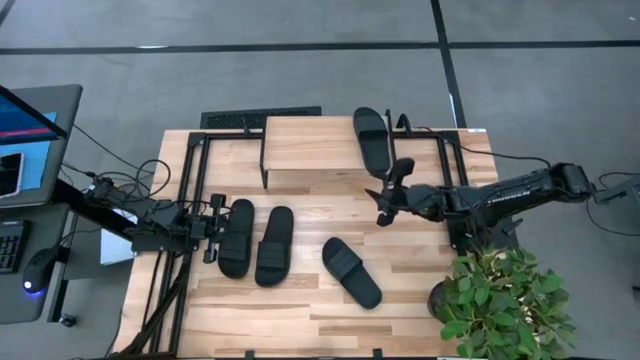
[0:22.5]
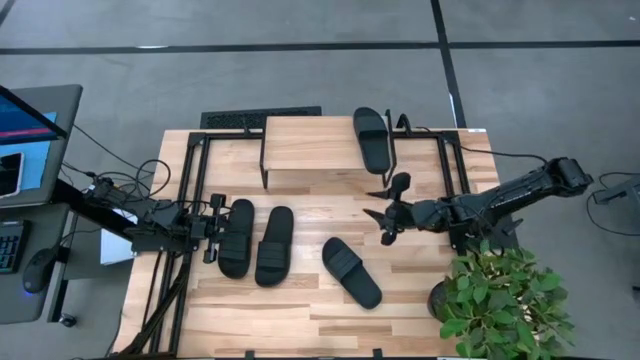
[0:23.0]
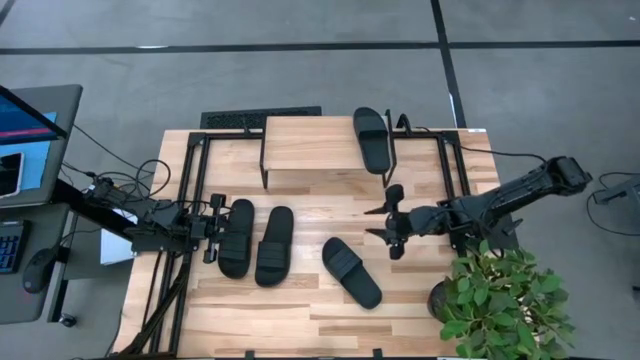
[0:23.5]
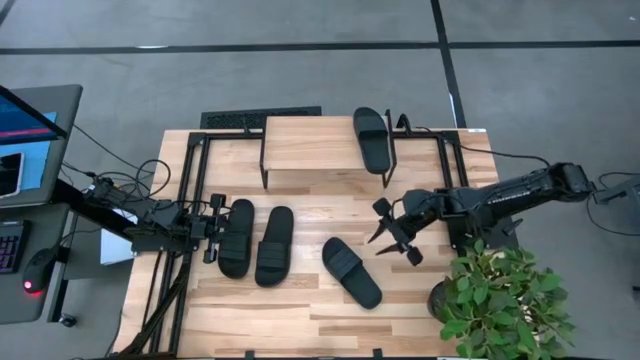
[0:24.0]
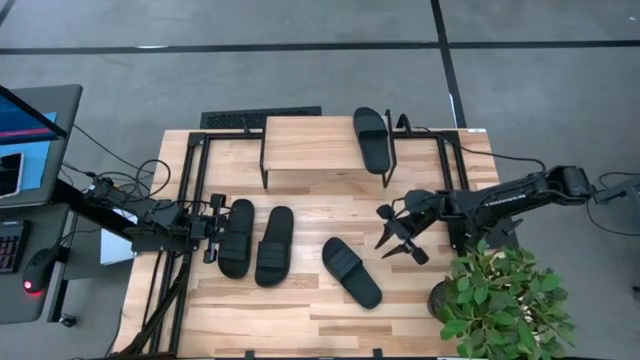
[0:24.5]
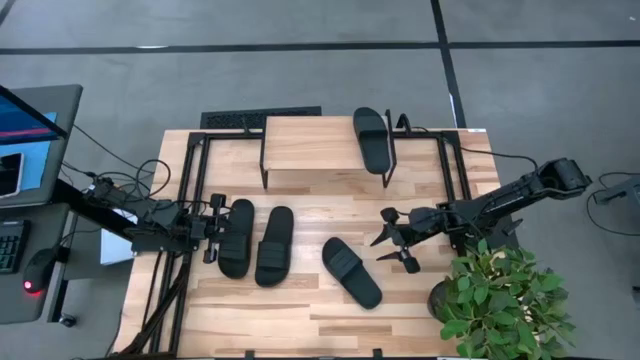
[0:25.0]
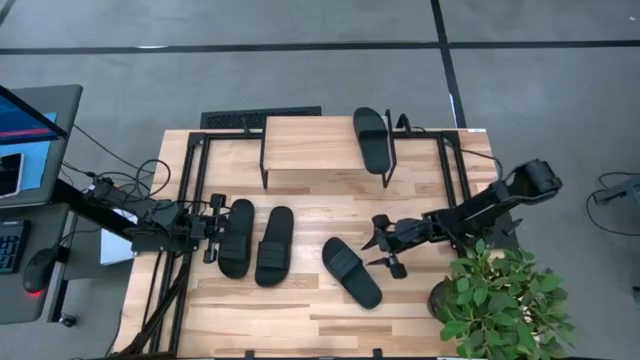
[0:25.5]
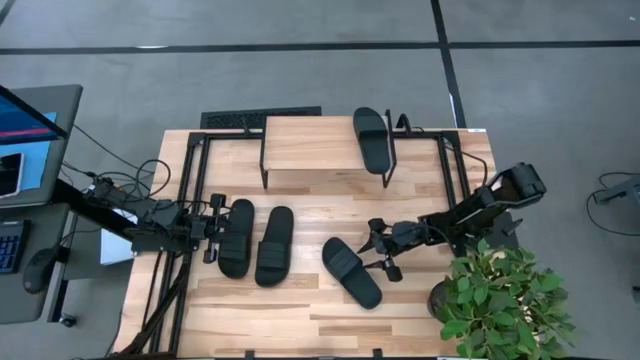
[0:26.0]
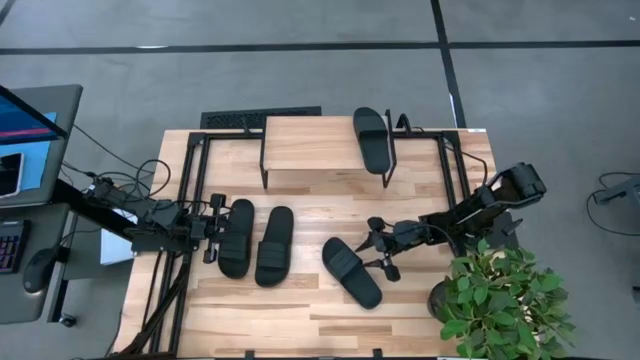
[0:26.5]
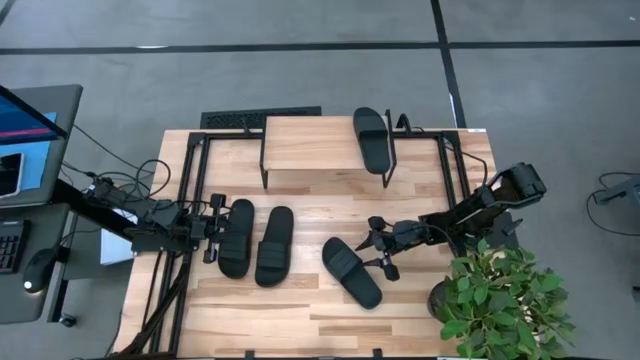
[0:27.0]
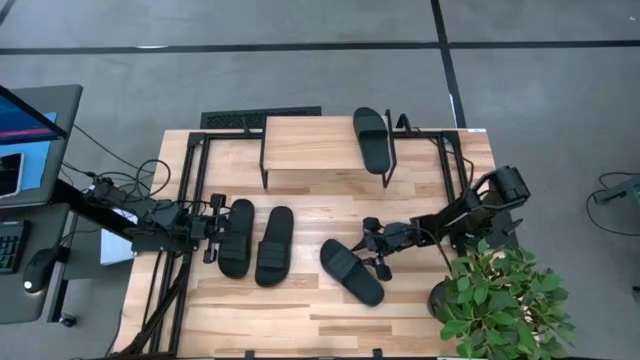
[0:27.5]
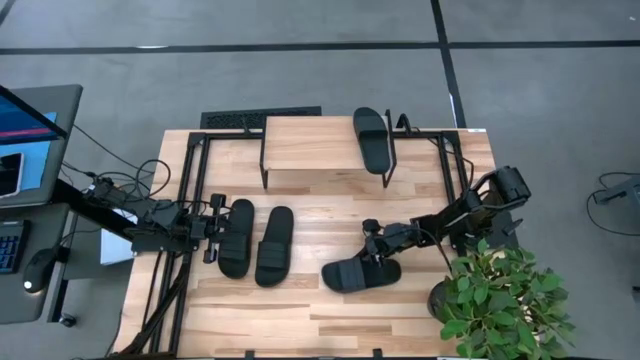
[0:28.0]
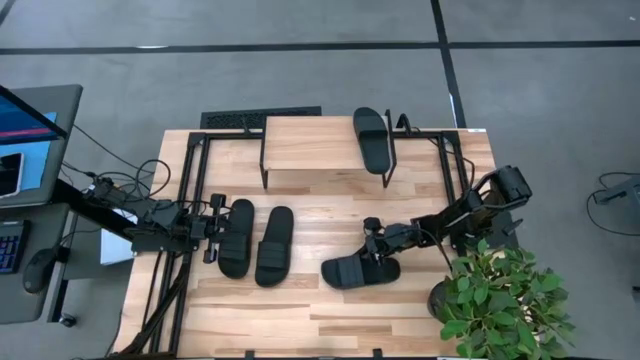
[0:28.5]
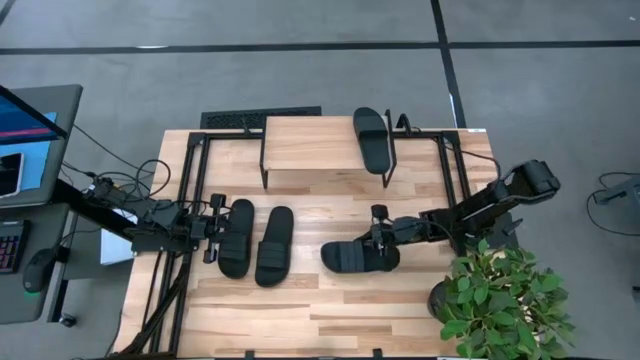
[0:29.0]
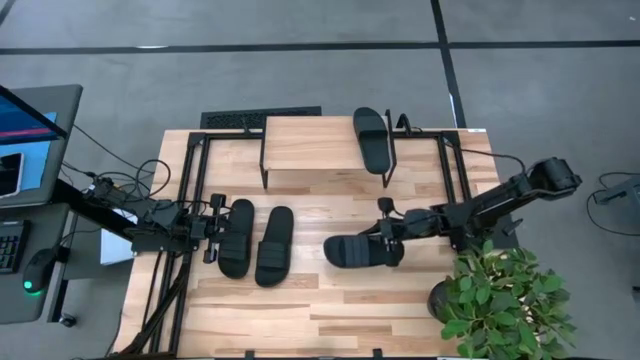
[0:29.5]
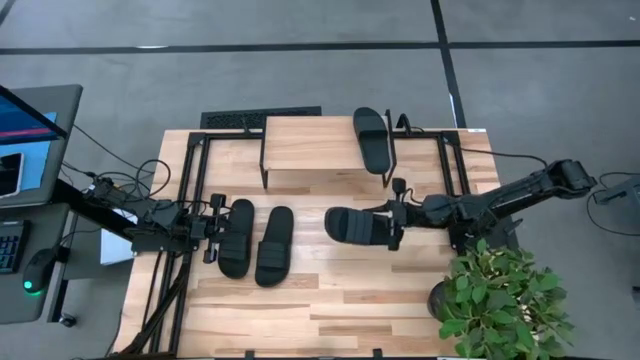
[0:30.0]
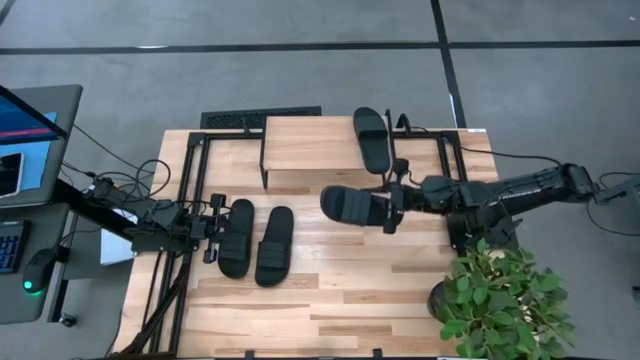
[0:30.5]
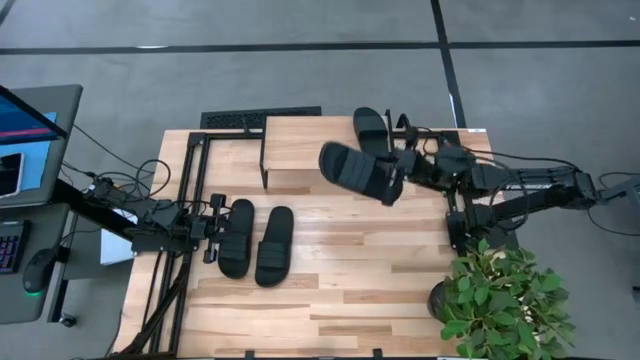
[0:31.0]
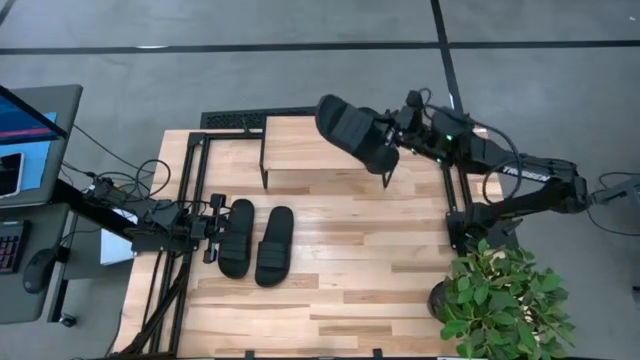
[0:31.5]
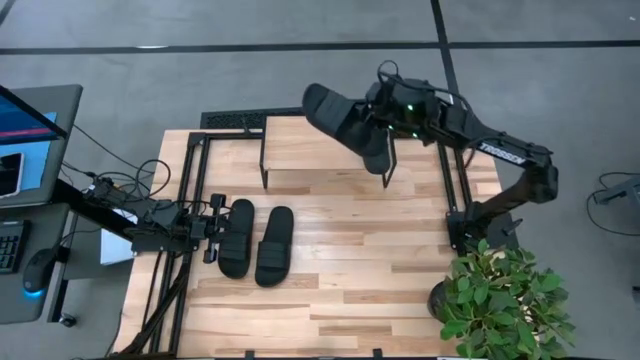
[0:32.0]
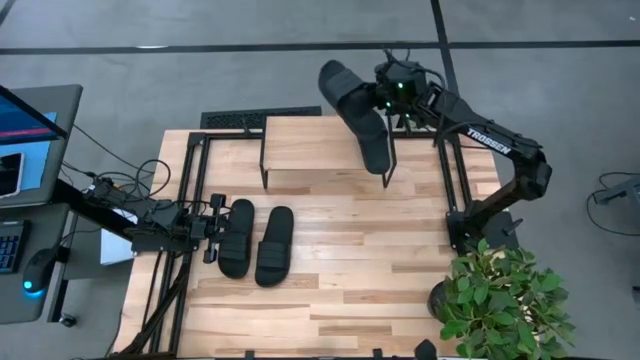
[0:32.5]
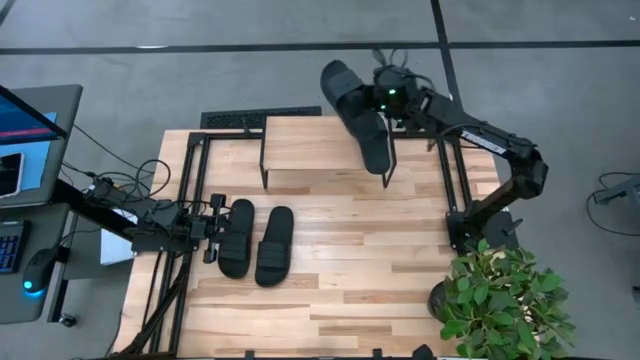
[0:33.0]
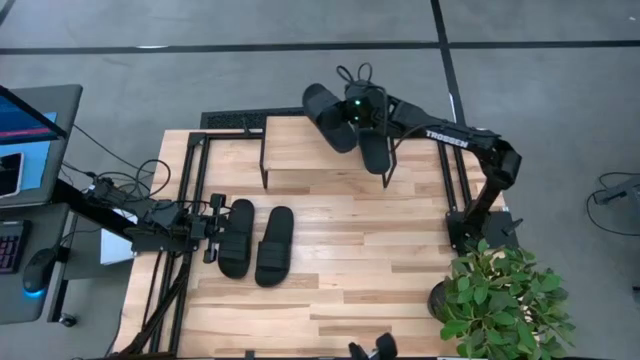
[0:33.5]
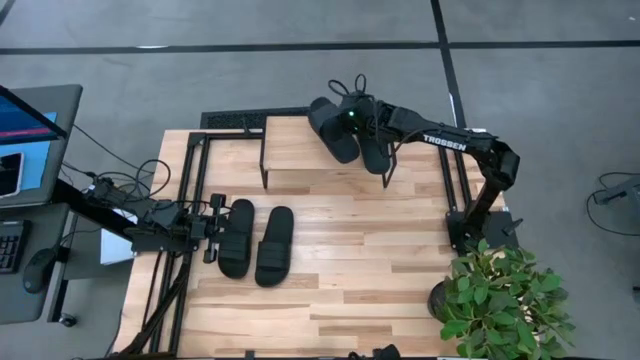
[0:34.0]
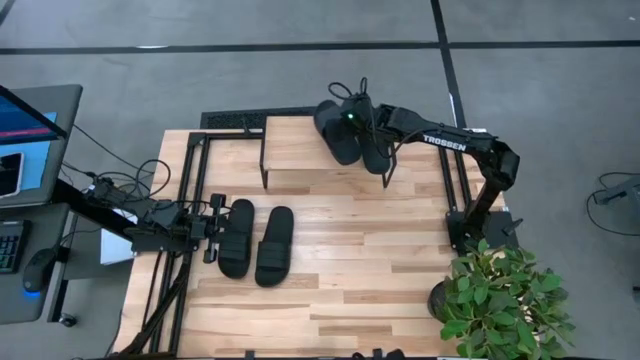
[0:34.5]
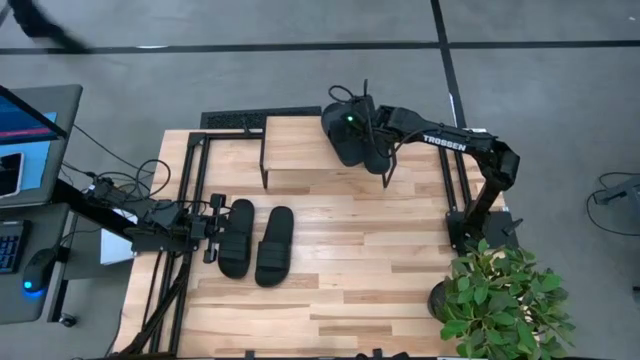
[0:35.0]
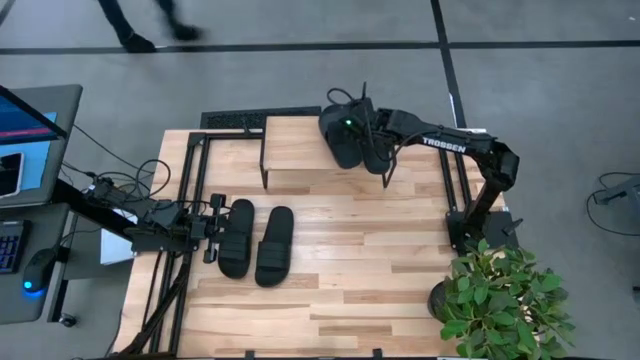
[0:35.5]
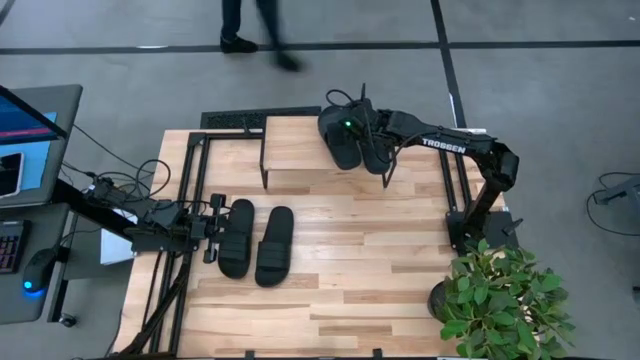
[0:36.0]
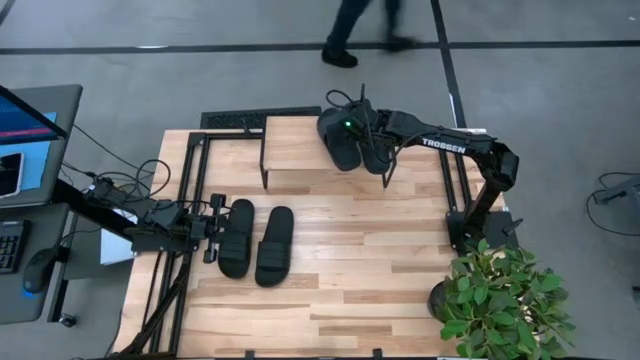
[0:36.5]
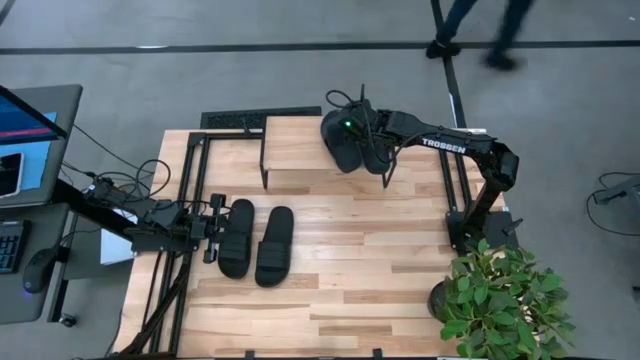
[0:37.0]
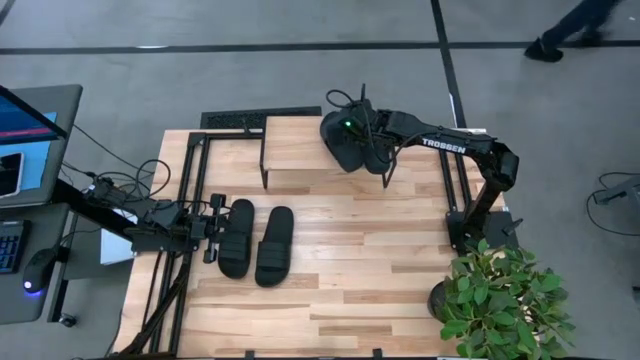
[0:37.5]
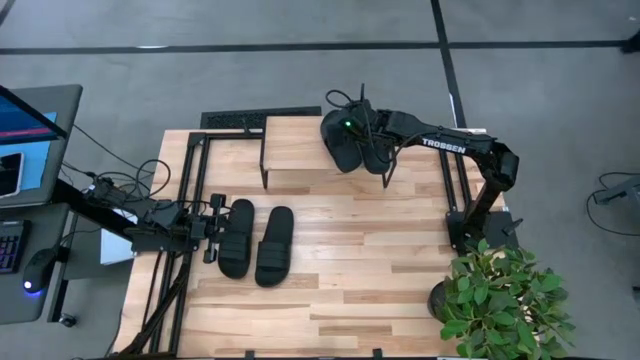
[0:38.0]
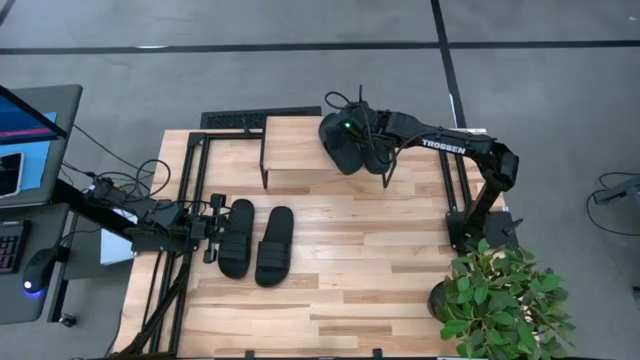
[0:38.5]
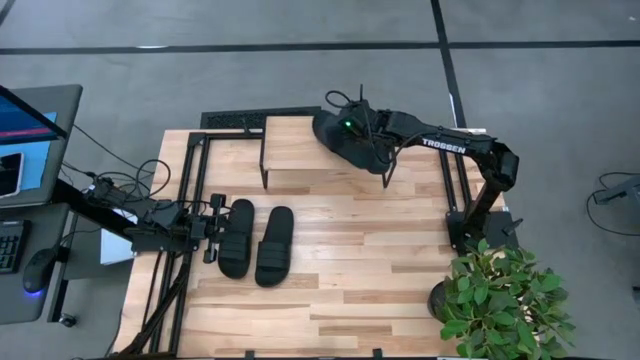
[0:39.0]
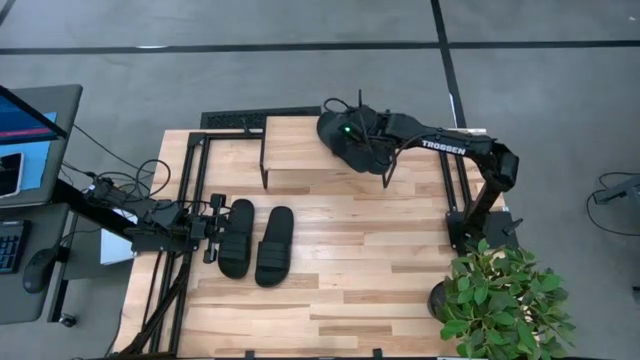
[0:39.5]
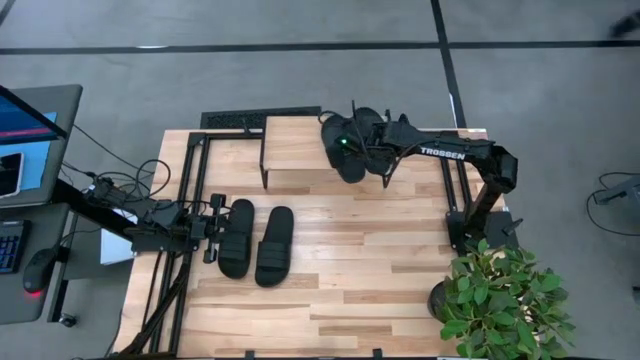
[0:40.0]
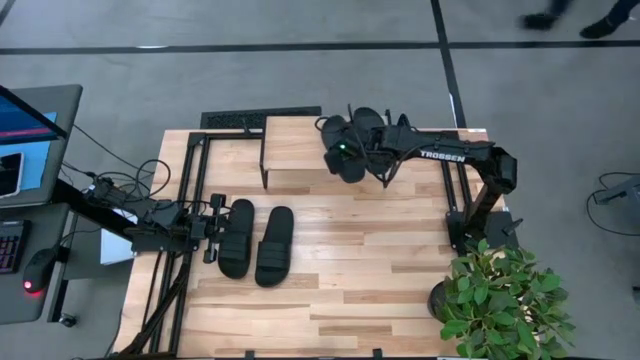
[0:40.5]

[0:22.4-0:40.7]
Task: Pick and place slides into the shelf
Put the right black slide on the shelf

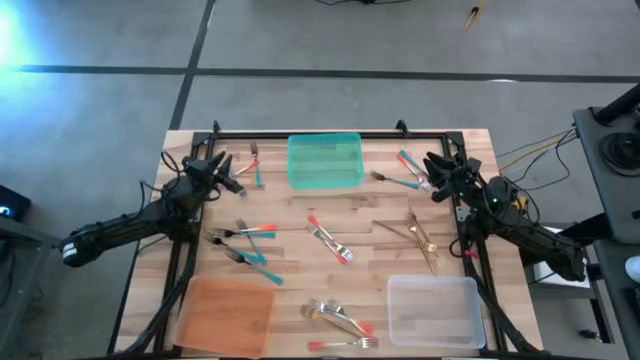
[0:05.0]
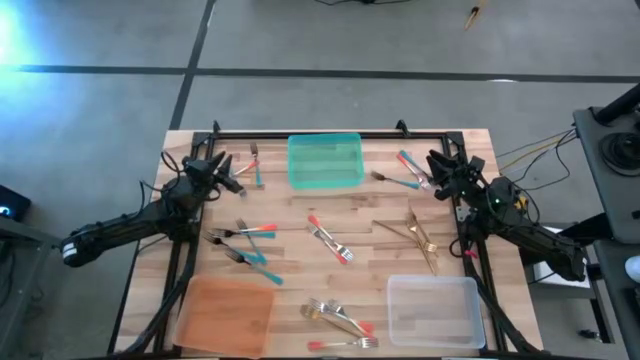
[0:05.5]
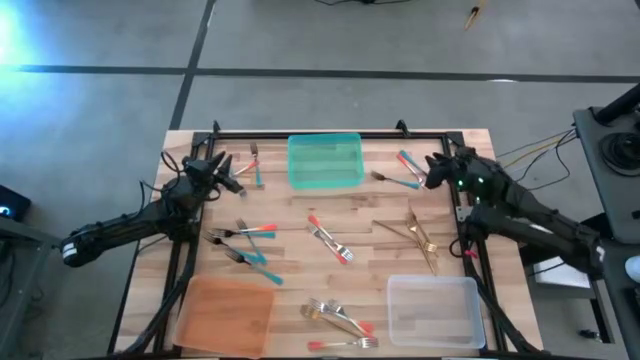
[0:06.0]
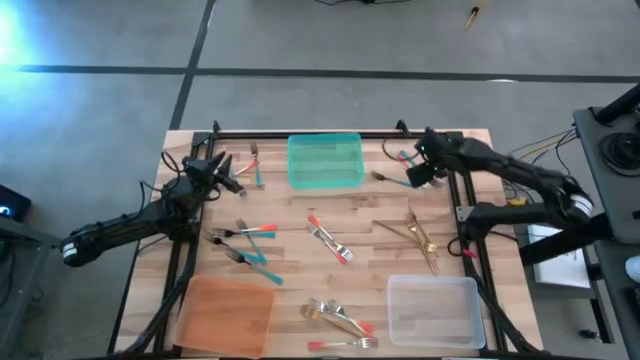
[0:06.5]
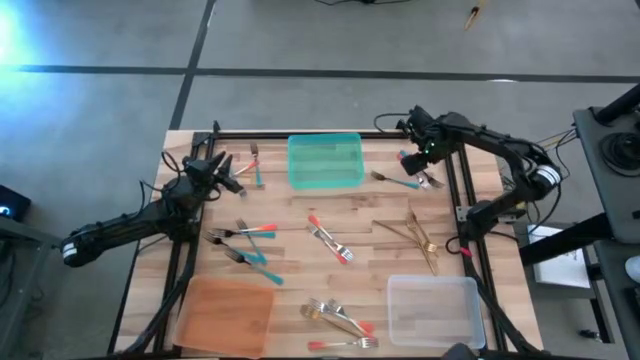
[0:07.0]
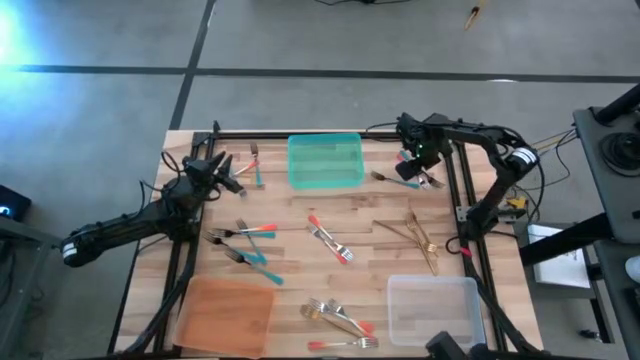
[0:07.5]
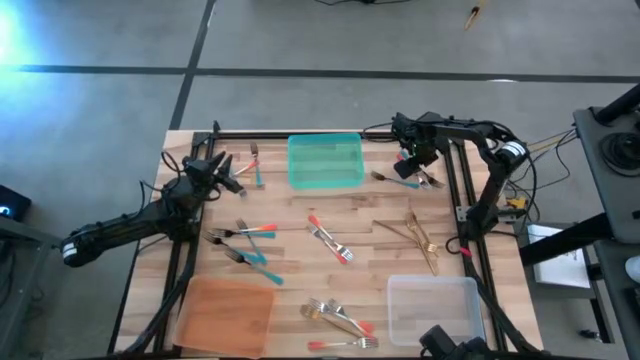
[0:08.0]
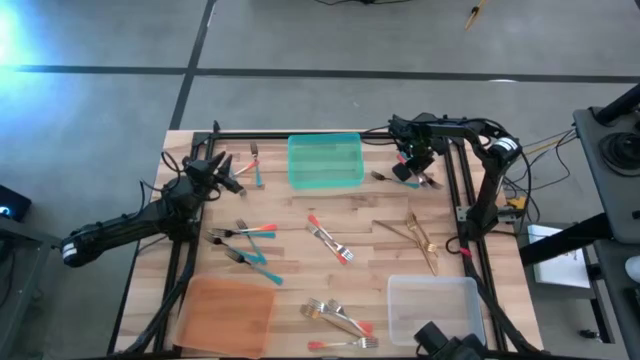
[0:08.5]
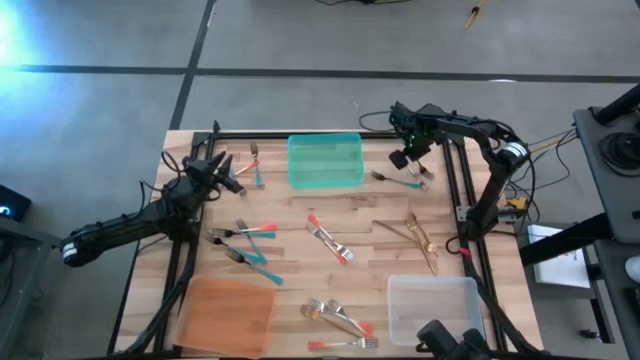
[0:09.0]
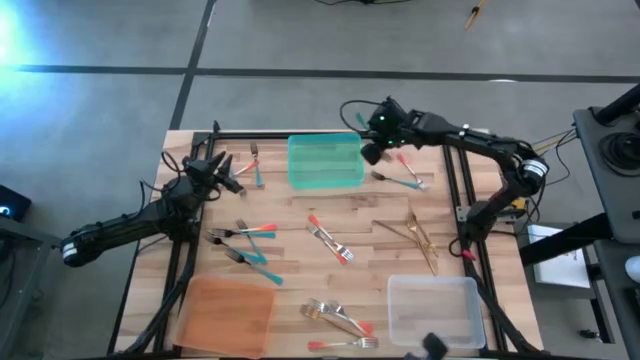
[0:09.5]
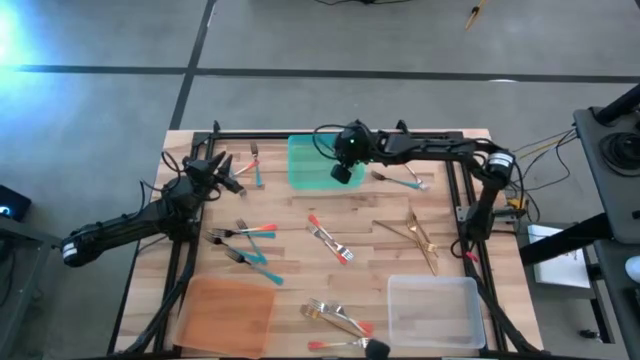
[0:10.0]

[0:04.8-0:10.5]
Task: Sort silverware by color (type)
Put the blue fork into the blue bin
